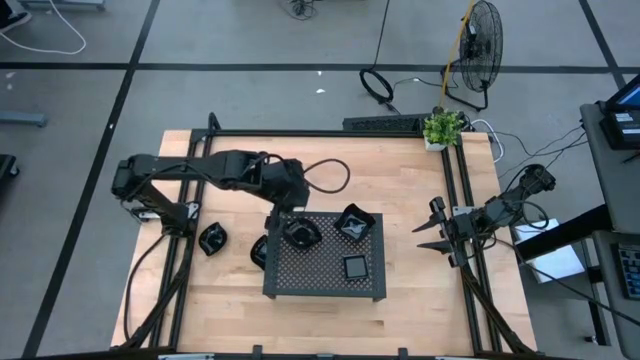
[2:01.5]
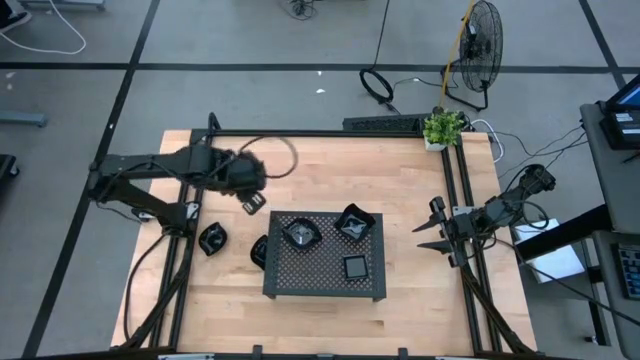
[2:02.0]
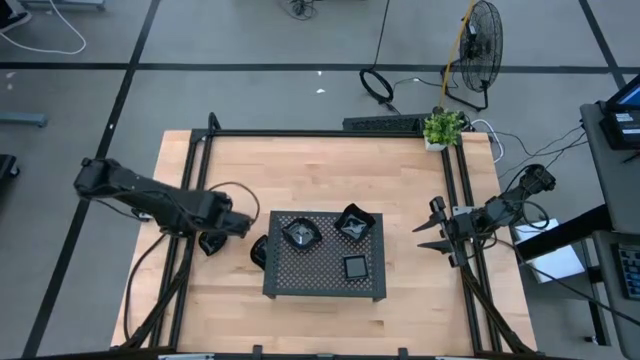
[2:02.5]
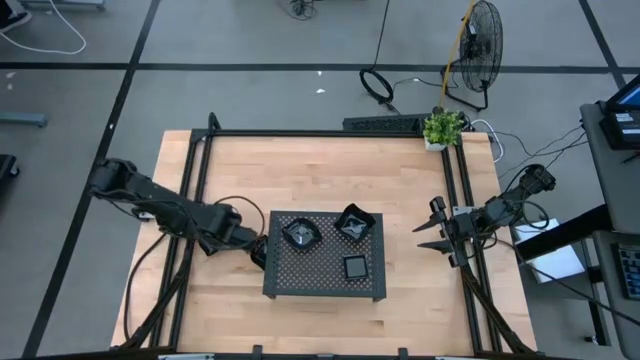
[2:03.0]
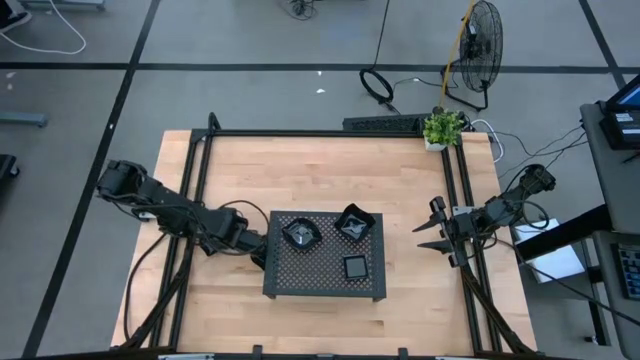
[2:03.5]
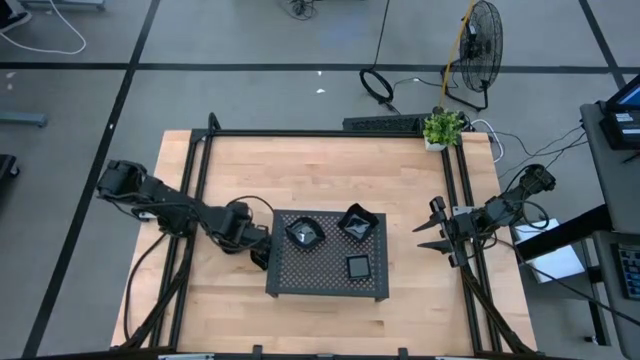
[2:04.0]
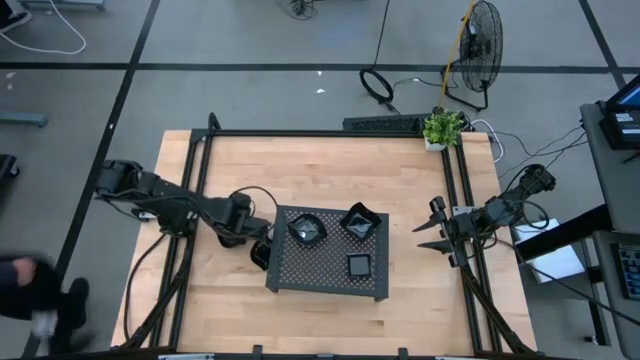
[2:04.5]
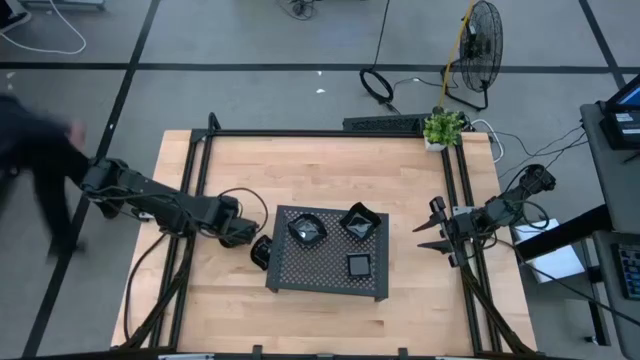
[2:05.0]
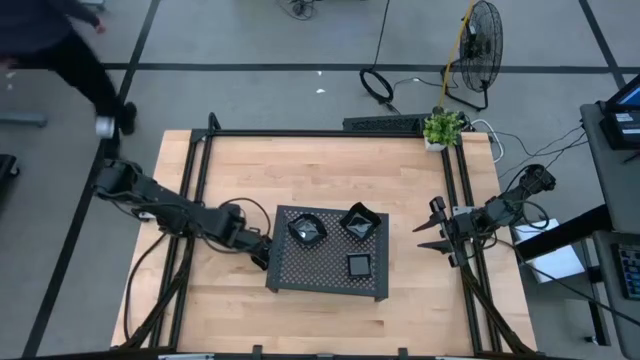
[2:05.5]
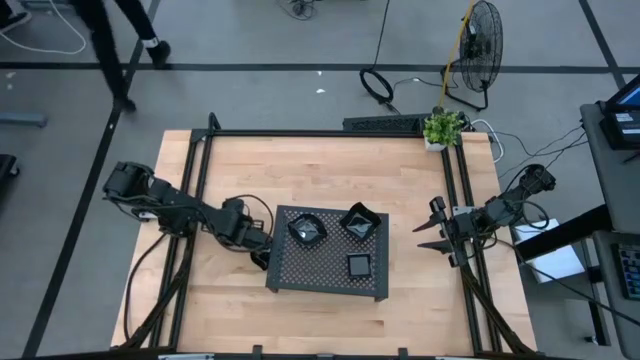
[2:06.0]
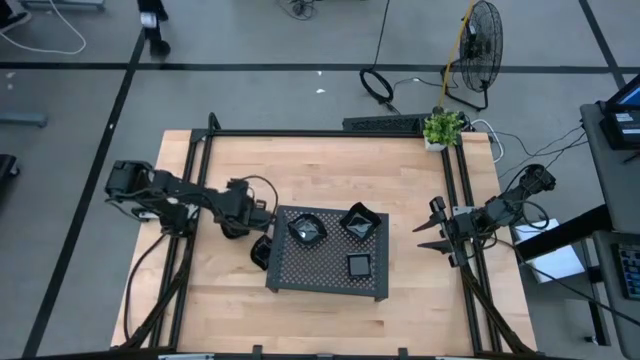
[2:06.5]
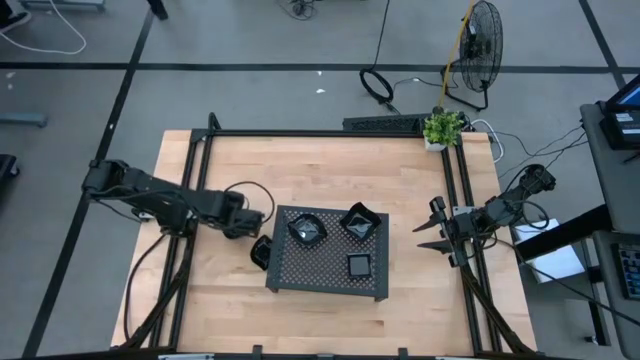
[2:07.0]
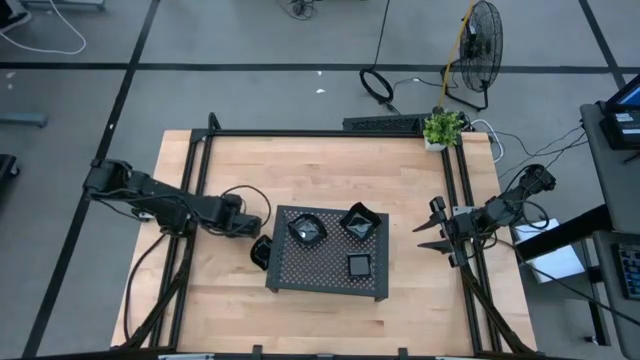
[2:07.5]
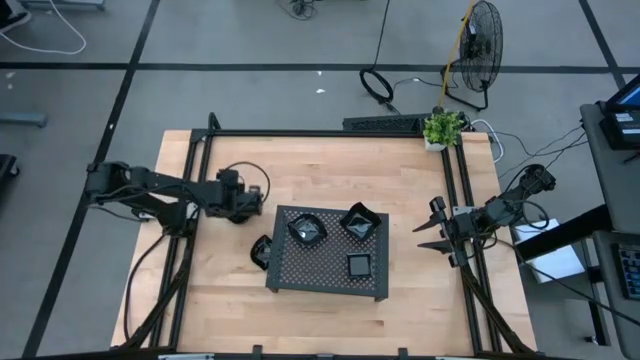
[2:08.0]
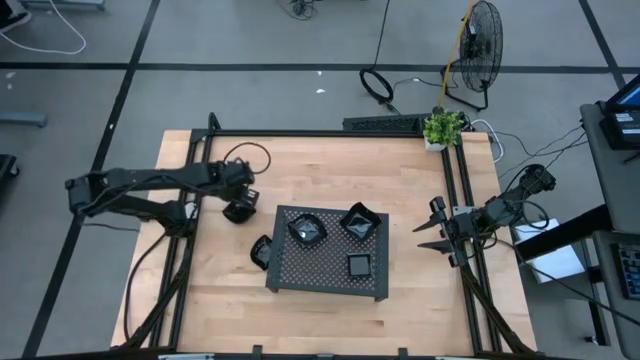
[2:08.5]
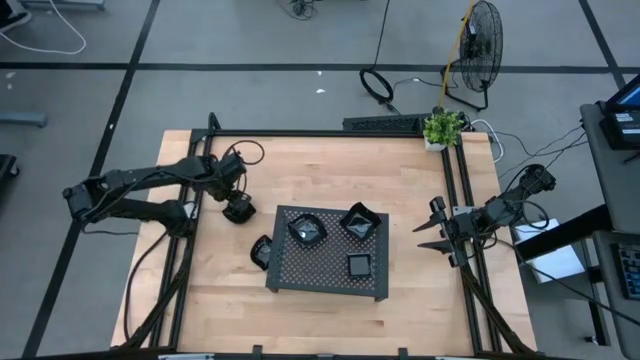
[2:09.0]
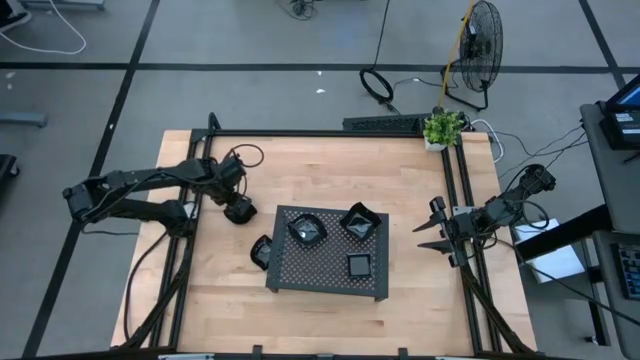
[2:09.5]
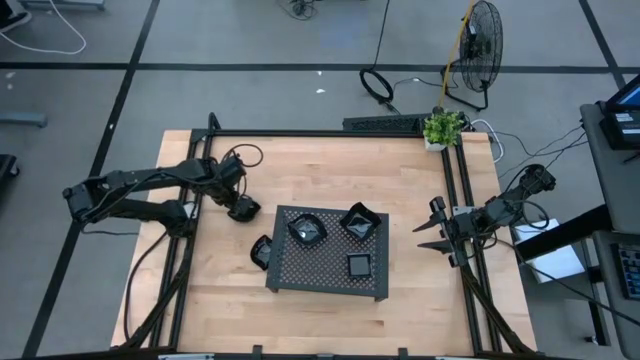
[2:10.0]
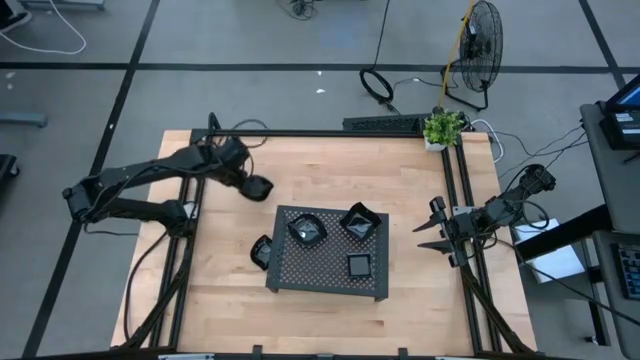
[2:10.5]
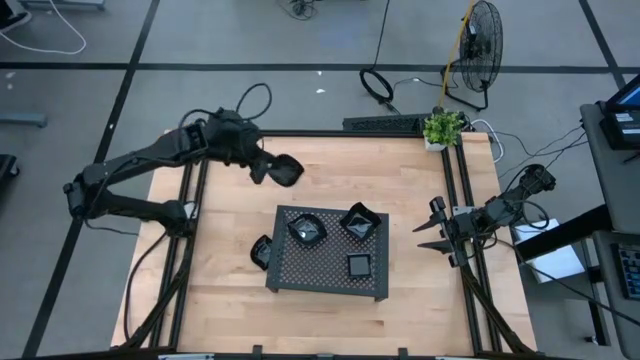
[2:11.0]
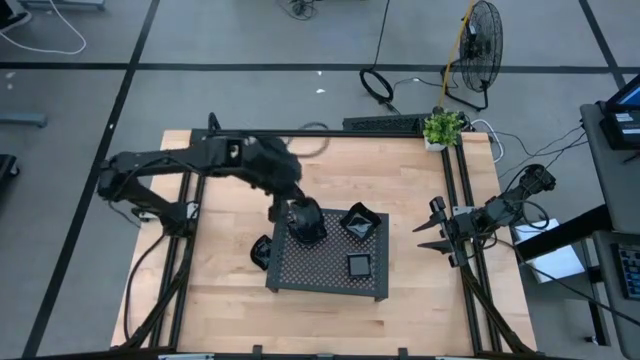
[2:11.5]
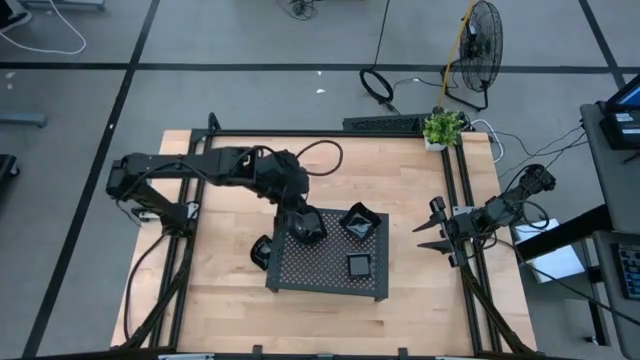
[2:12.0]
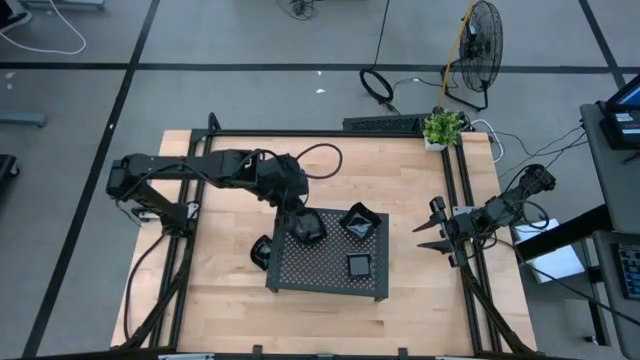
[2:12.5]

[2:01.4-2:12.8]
Task: Pick & Place Mini shaped plates
Stack the black leaf-shaped plate on top of the black leaf-shaped plates on the shelf

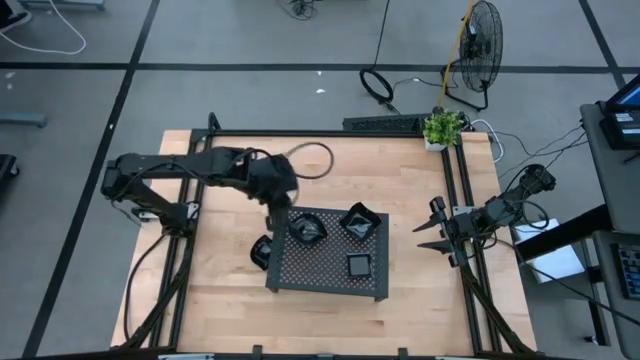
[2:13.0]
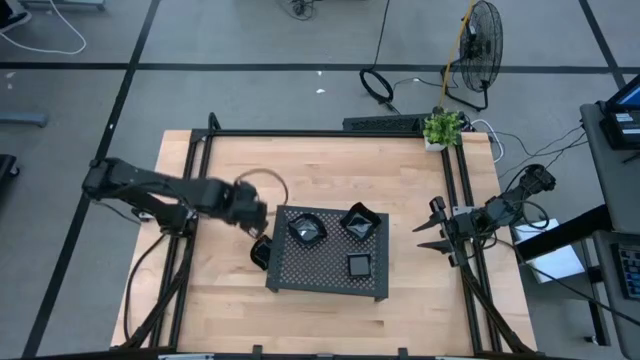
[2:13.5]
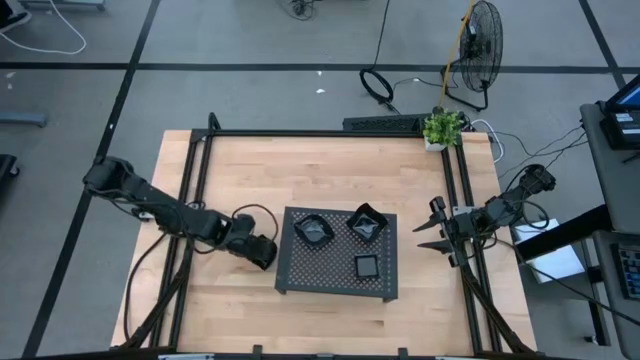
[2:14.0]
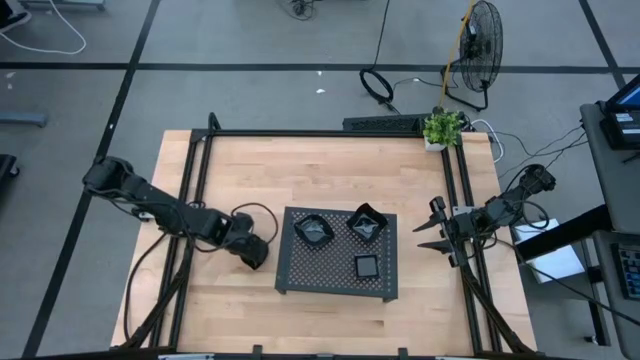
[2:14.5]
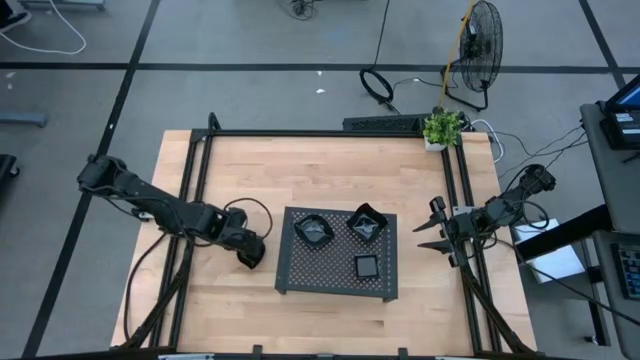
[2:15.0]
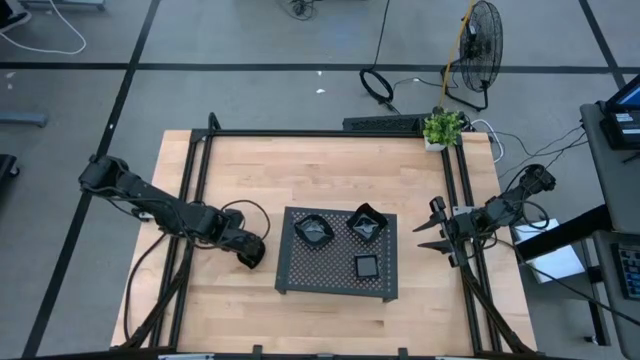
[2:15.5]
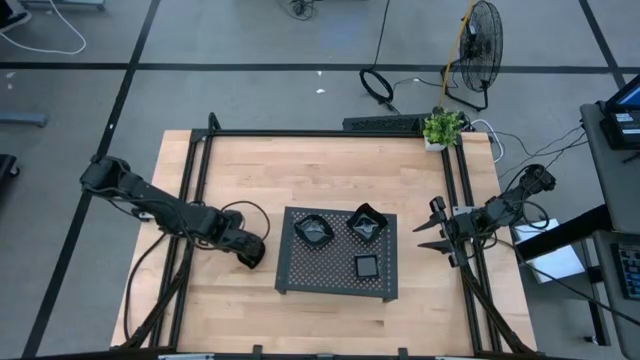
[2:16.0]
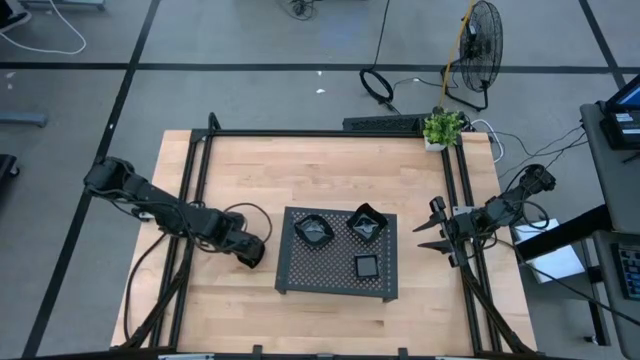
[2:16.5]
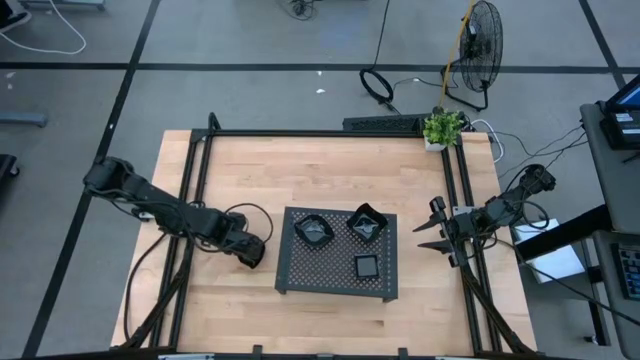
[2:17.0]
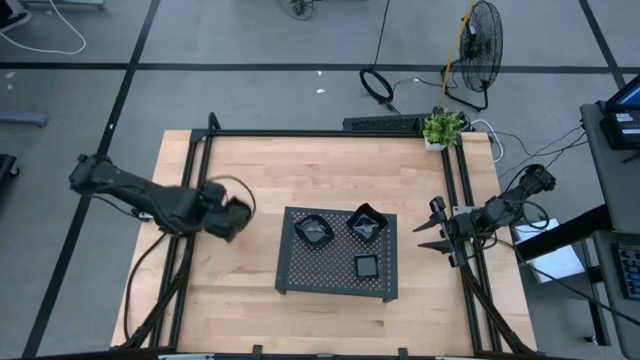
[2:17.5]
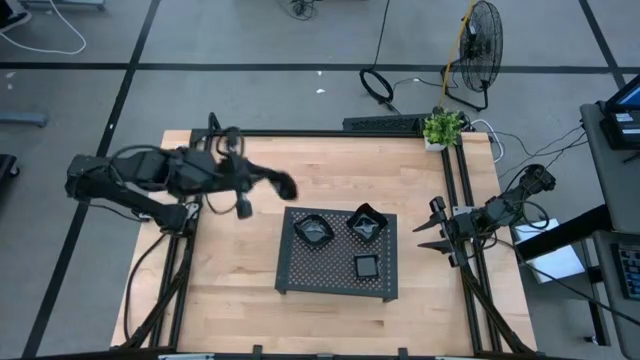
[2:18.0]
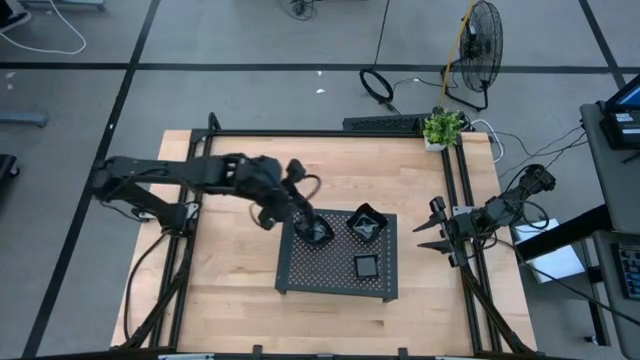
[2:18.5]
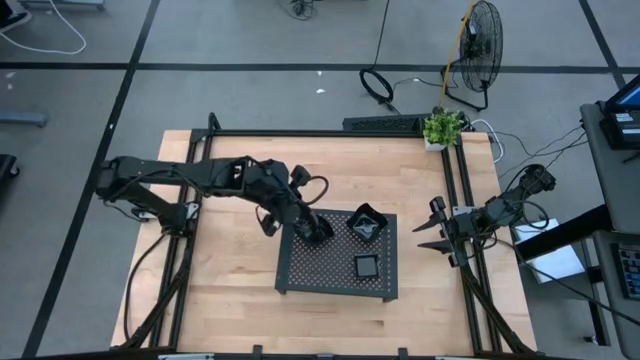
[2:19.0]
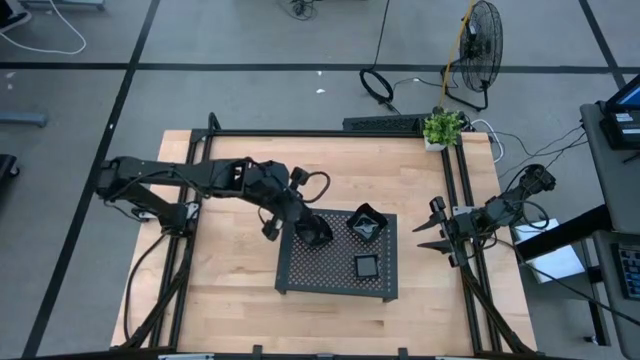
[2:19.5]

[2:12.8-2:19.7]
Stack the black leaf-shaped plate on top of the black leaf-shaped plates on the shelf

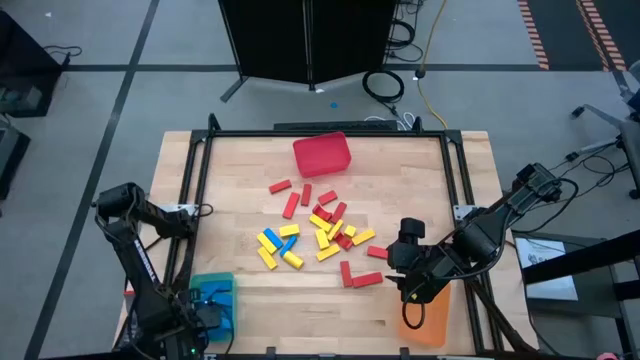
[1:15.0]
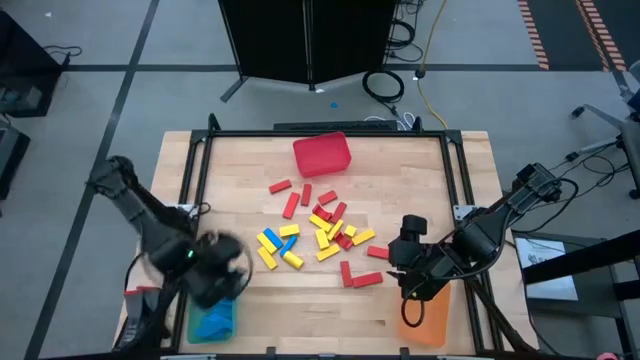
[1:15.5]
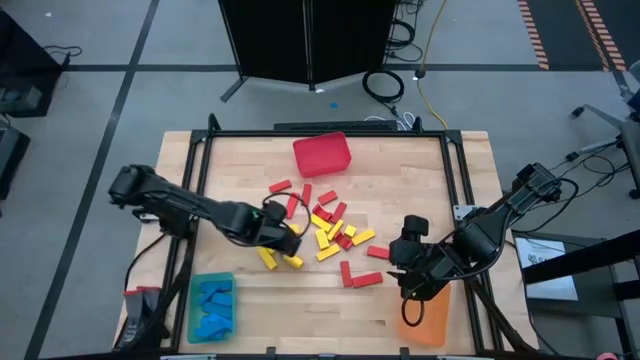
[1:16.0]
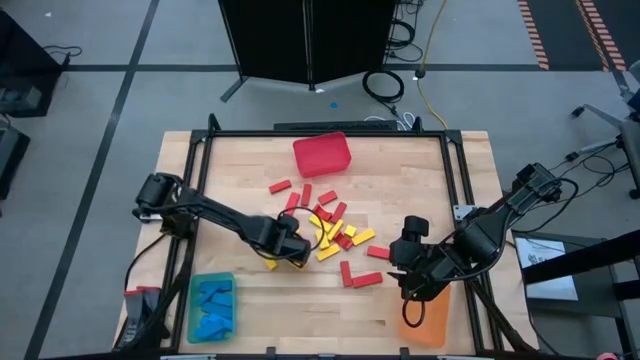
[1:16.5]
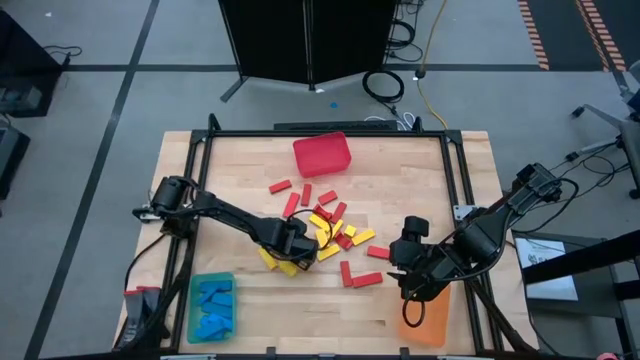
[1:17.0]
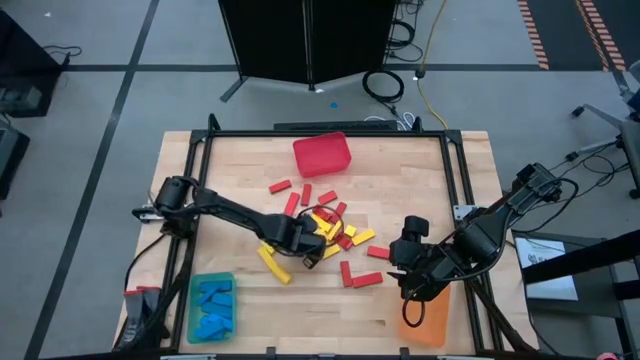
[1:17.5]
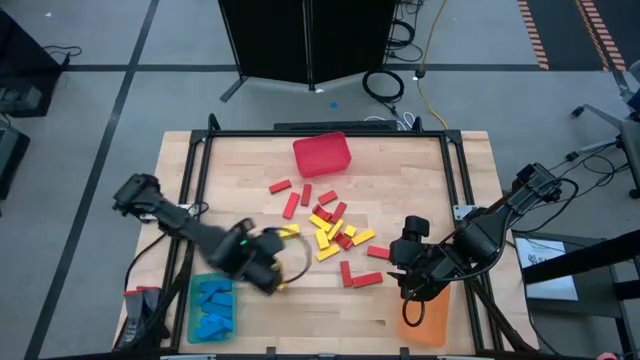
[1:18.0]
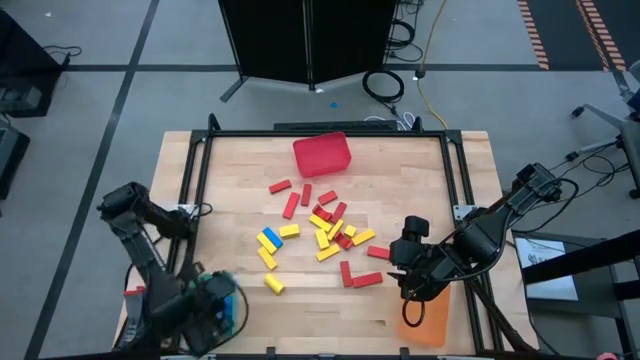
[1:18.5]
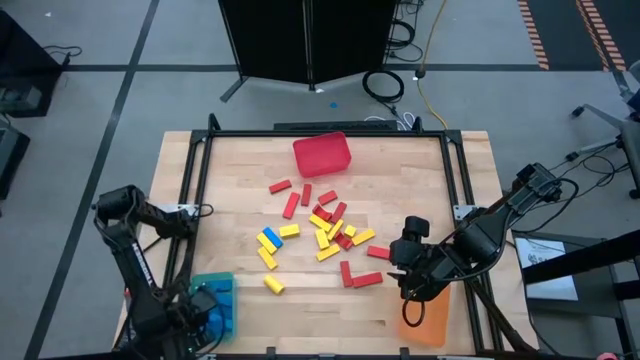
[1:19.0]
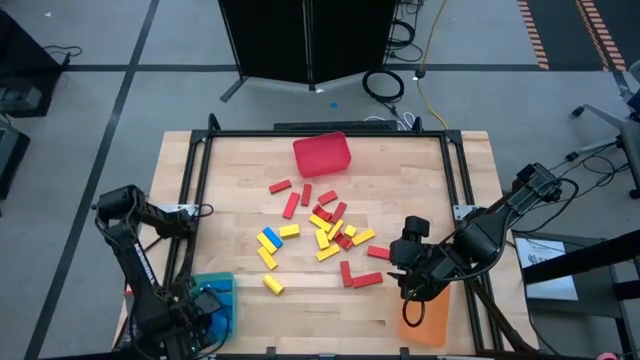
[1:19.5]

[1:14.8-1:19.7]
Task: Sort blocks
Put the blue block into the green bin
